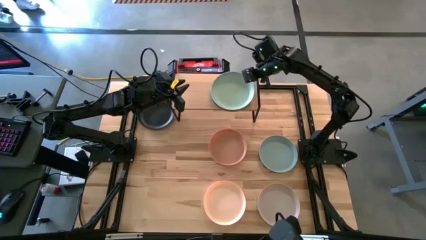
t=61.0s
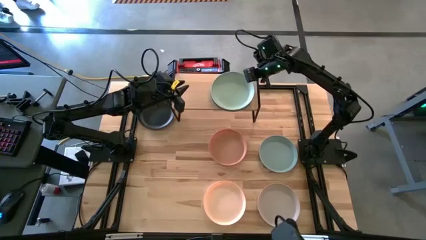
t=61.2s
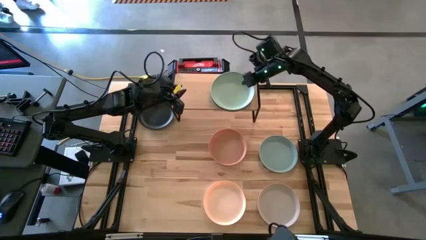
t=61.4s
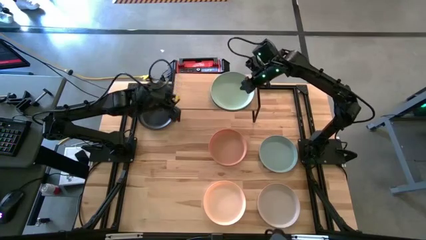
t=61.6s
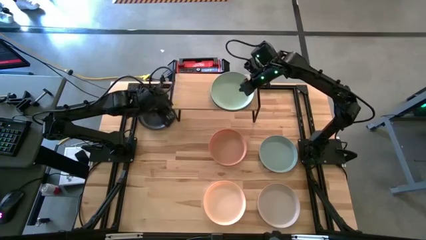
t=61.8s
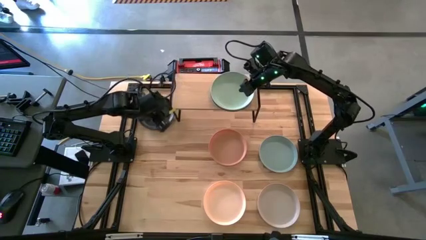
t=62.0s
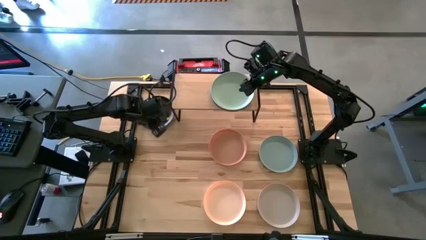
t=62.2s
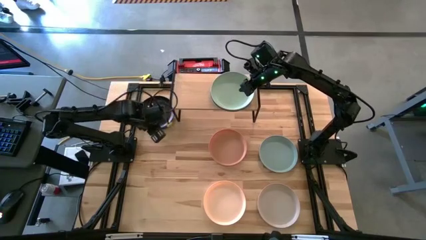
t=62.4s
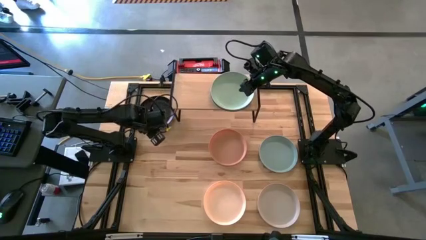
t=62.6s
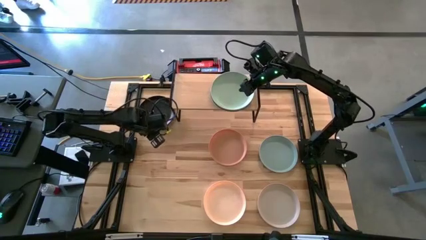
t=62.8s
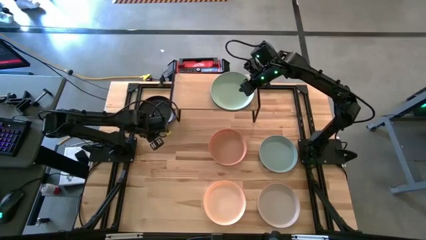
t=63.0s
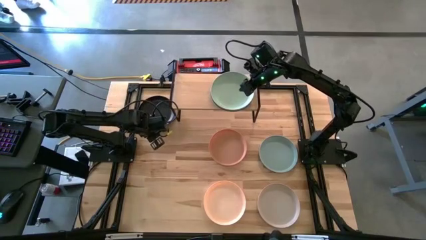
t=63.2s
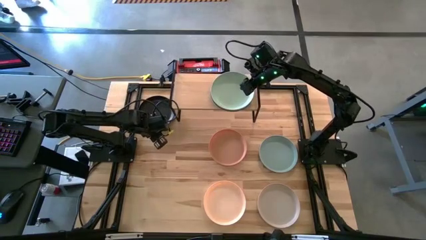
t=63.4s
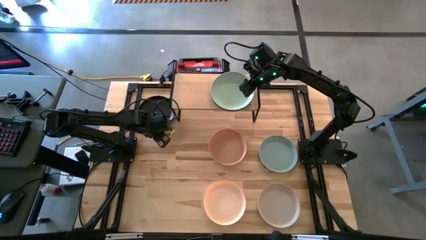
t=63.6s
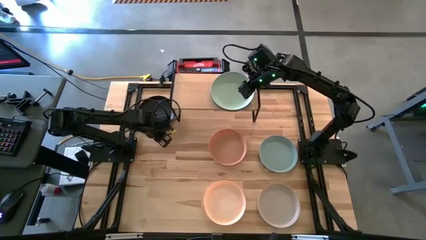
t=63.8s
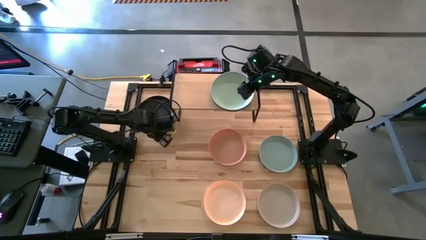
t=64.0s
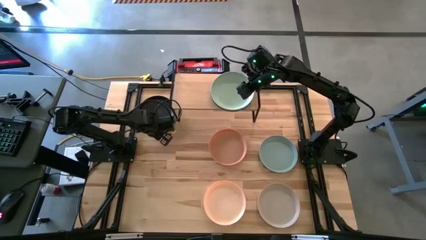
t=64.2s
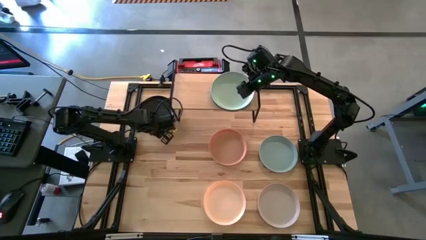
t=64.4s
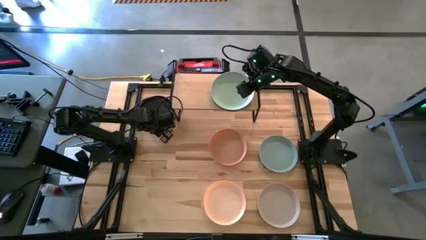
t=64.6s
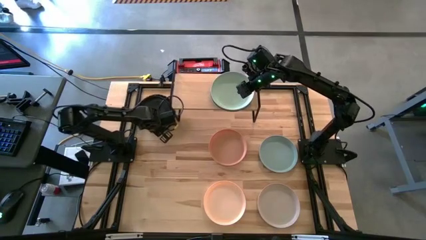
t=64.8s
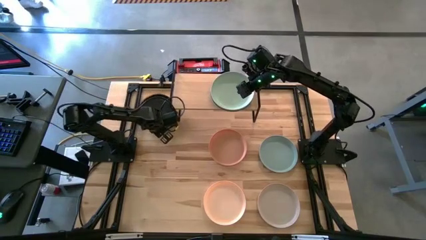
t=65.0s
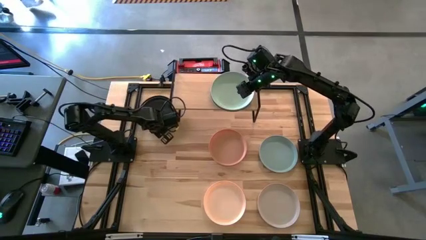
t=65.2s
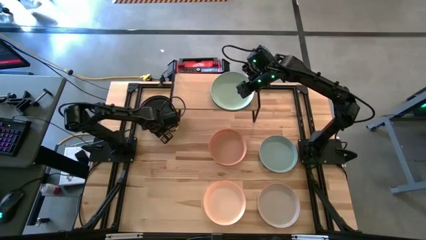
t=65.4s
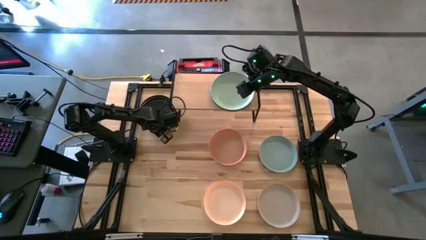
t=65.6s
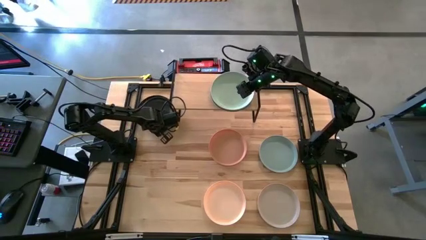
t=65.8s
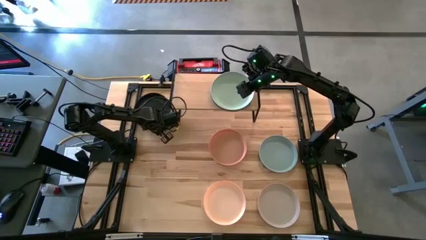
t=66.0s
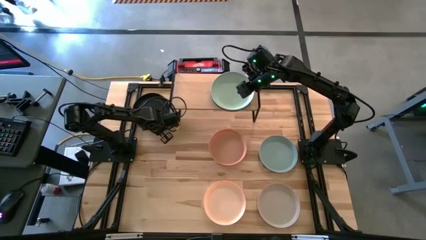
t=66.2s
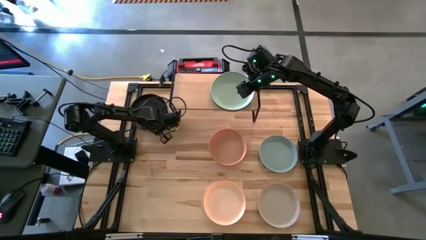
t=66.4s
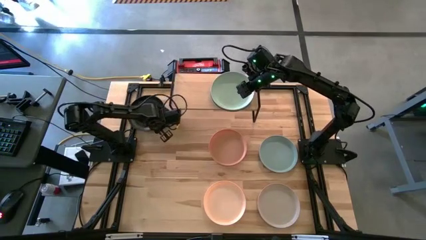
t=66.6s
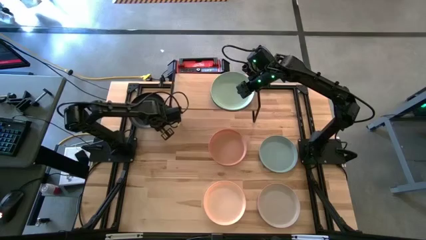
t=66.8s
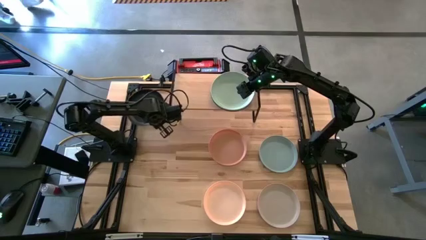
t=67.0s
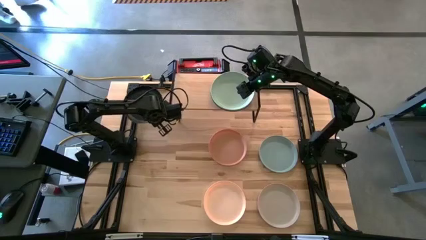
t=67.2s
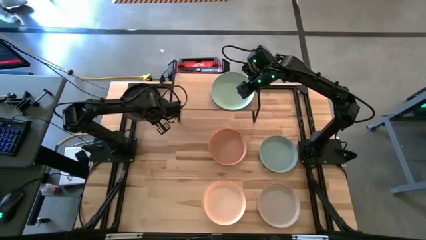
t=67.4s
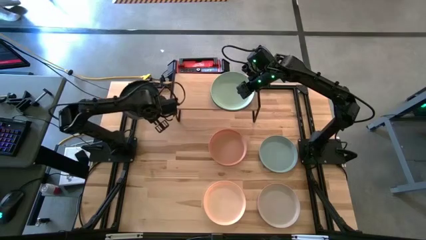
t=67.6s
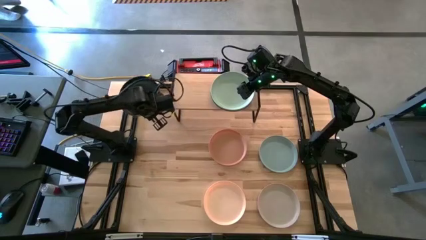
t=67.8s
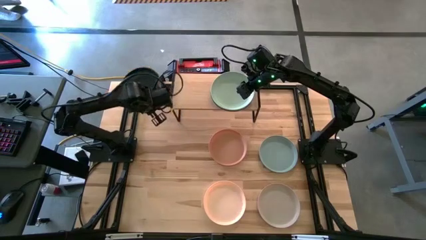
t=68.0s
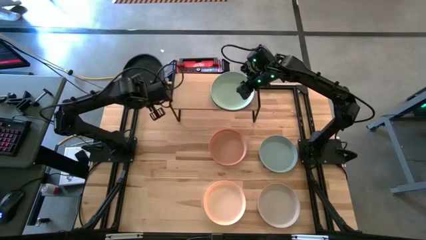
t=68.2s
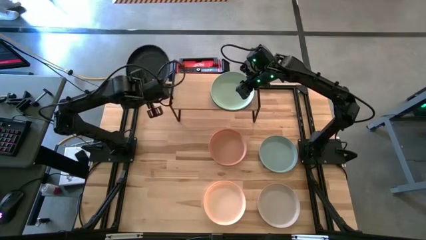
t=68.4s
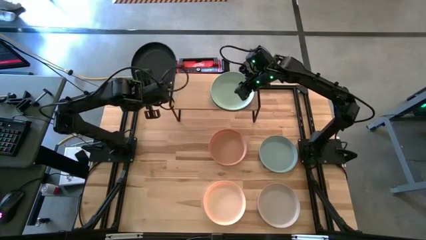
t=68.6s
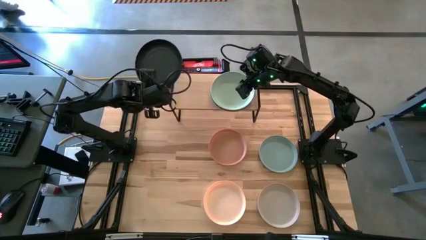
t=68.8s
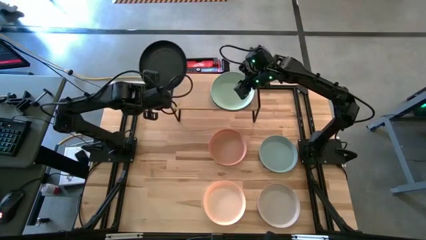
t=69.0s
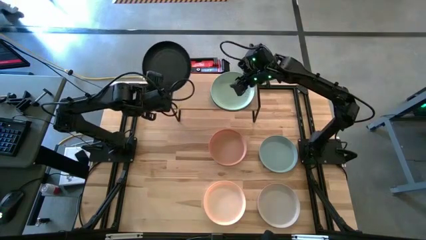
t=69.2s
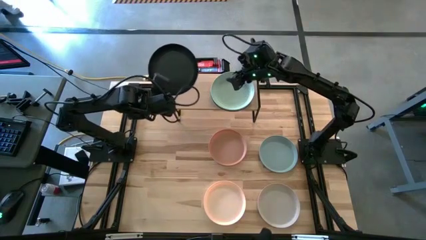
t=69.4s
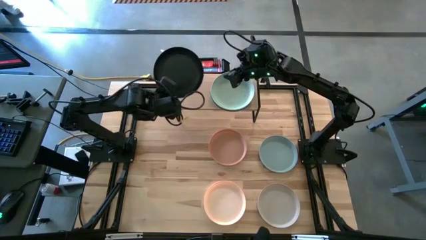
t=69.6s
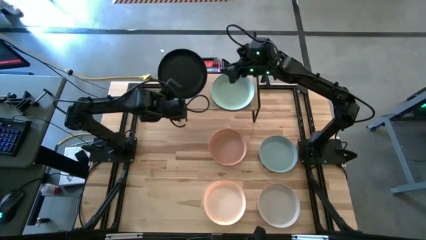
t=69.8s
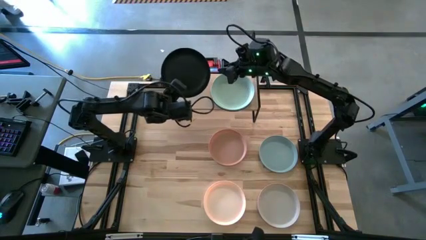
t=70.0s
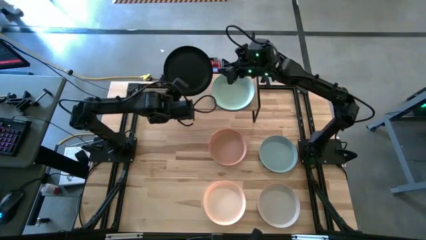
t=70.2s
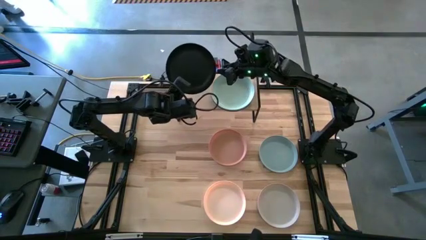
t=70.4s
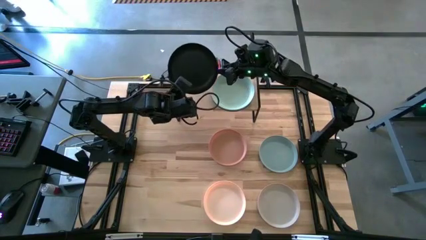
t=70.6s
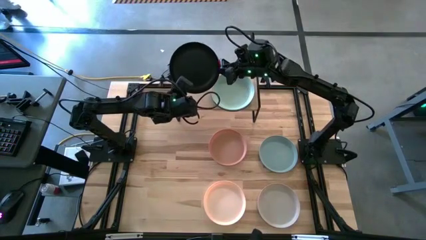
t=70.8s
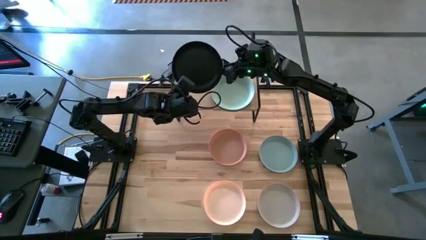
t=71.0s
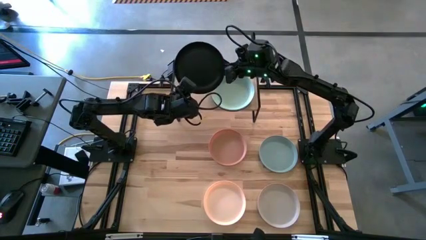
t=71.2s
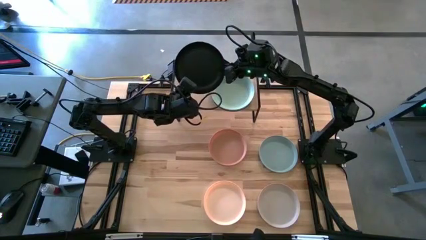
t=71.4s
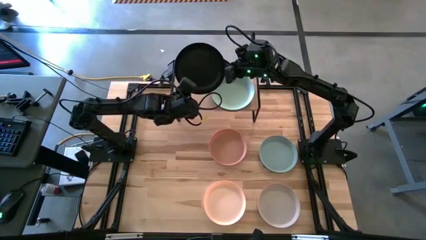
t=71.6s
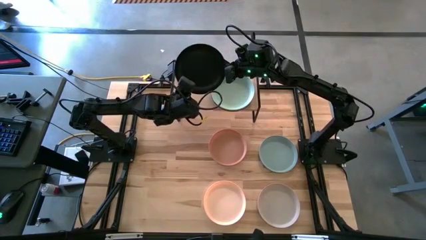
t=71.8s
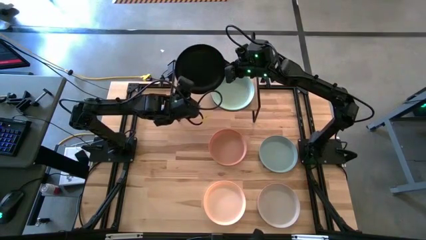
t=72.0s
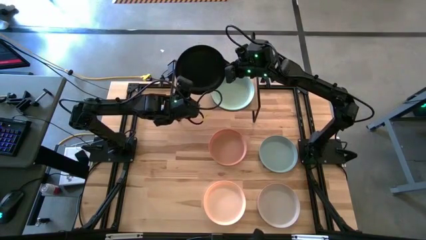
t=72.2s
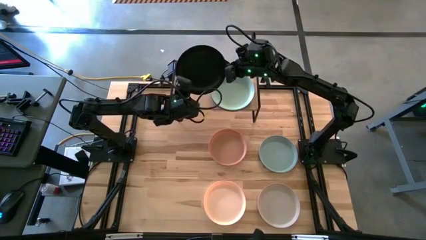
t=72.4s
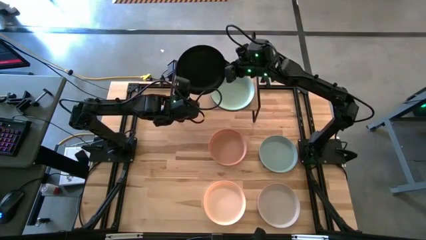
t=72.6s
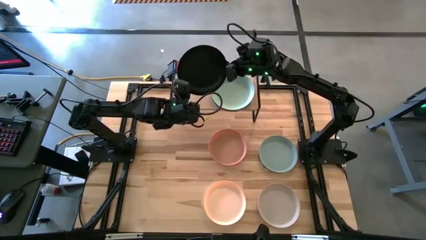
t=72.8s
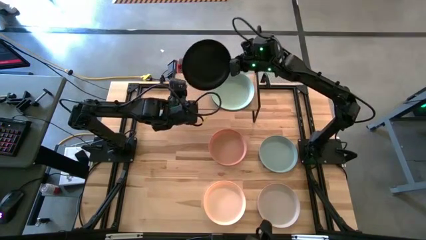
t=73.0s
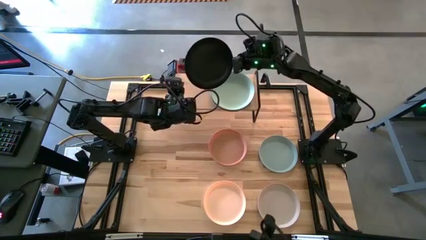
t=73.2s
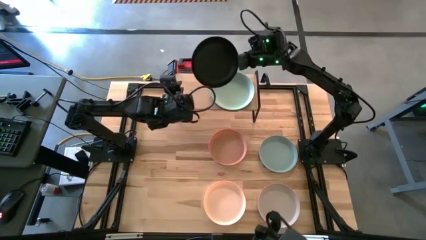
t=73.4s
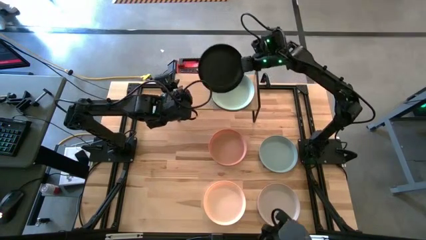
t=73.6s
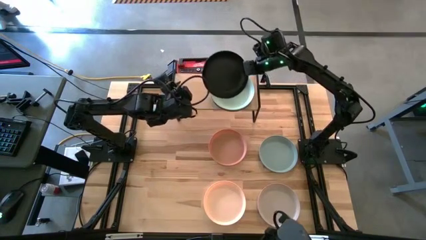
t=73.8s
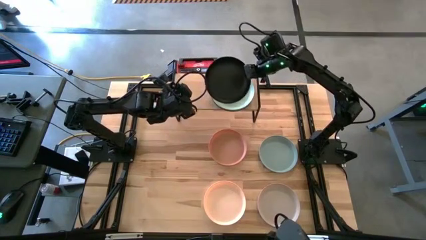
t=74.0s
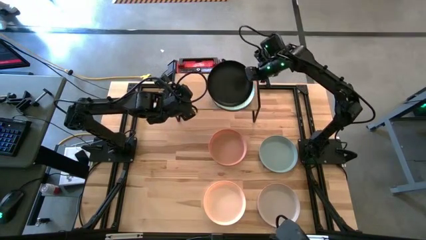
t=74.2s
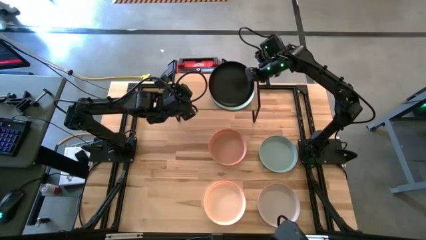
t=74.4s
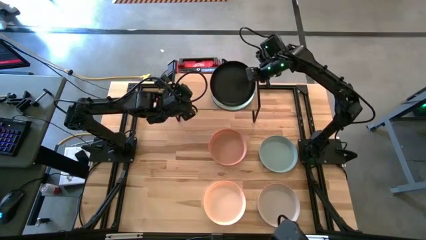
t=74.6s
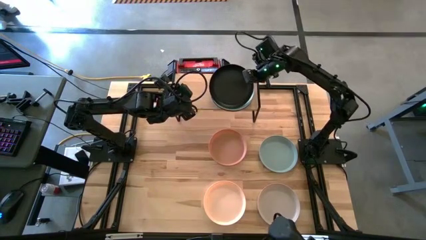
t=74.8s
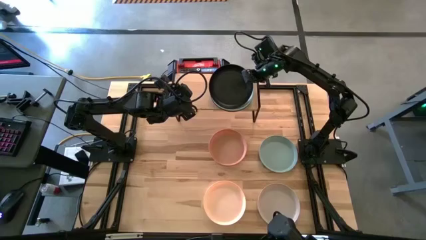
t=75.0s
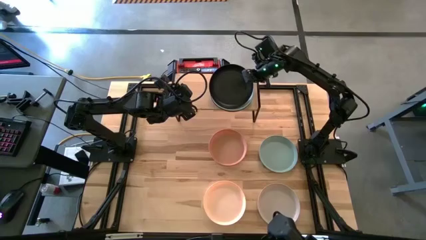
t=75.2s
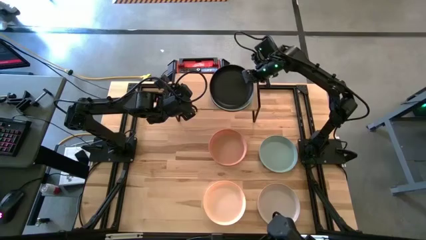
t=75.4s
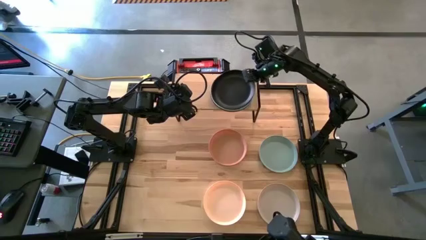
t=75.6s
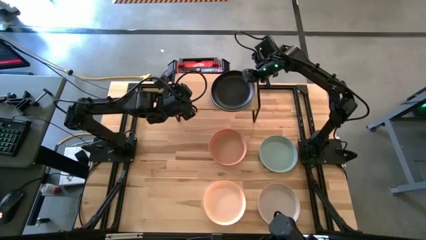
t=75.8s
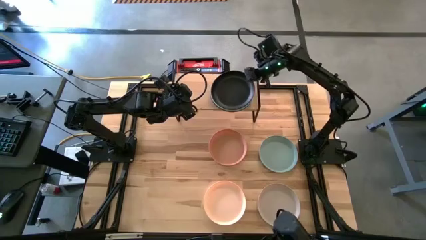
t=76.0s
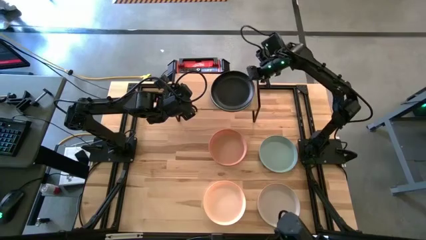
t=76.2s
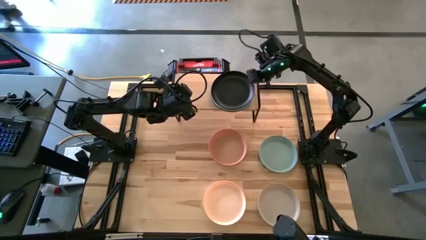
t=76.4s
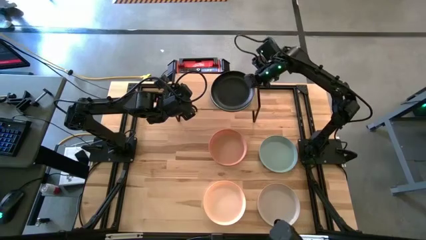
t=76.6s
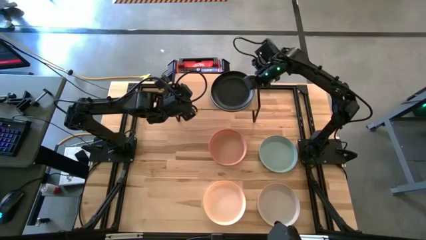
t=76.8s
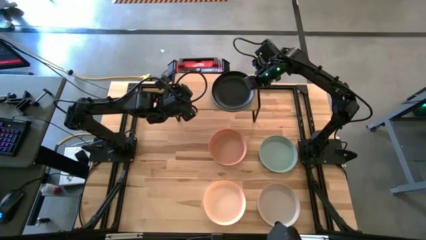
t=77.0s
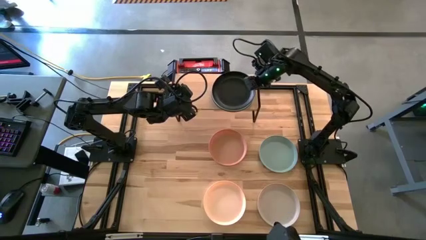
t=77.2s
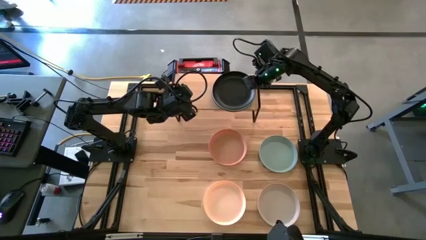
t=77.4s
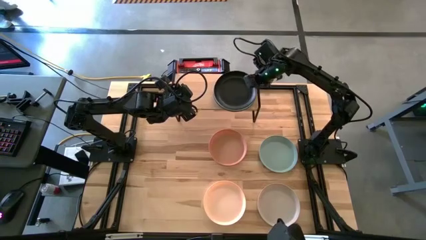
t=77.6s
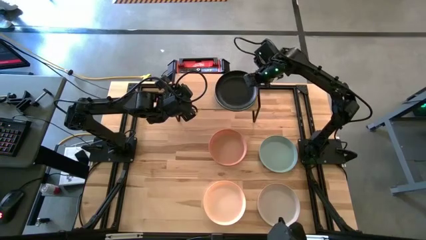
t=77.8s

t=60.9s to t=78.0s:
Task: Place and stack plates onto a shelf
Stack the black plate on the top of the green plate on the shelf
